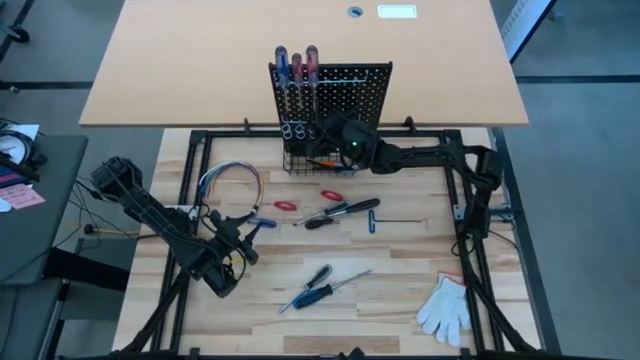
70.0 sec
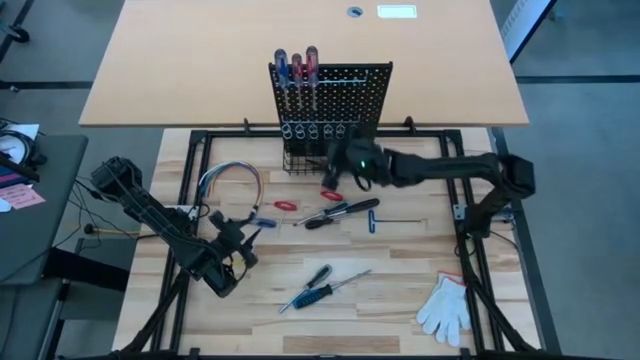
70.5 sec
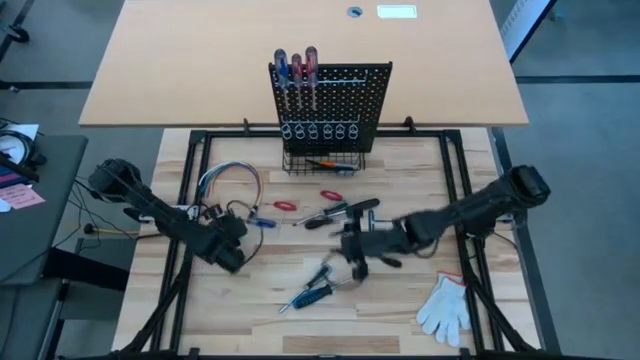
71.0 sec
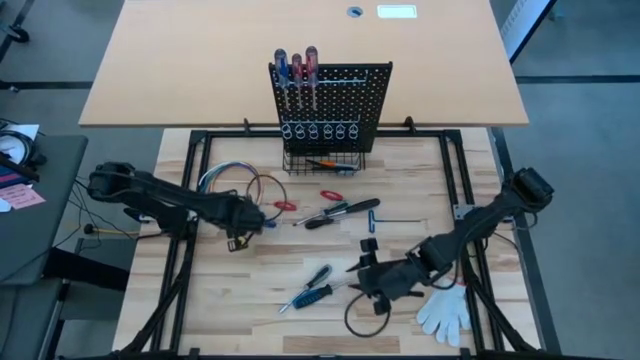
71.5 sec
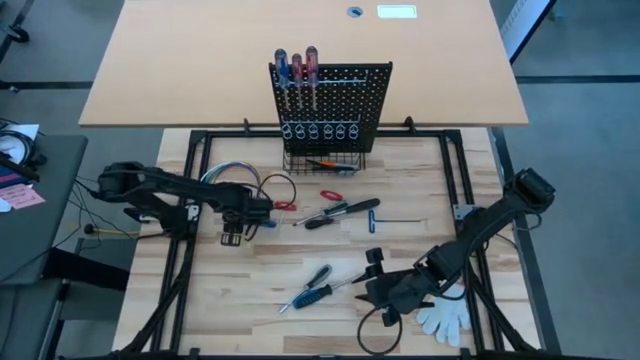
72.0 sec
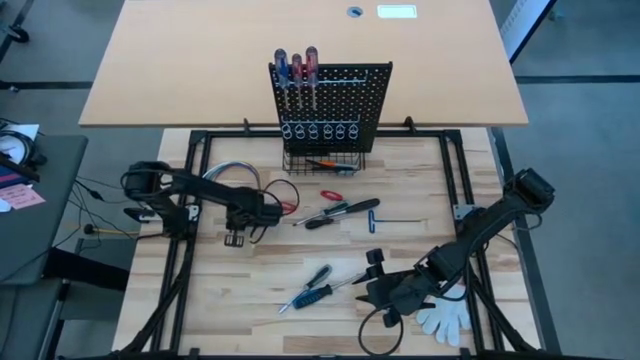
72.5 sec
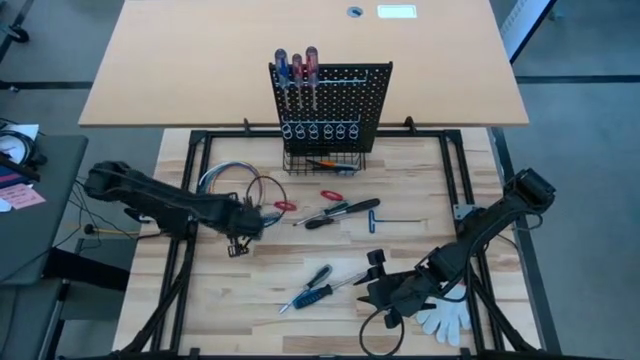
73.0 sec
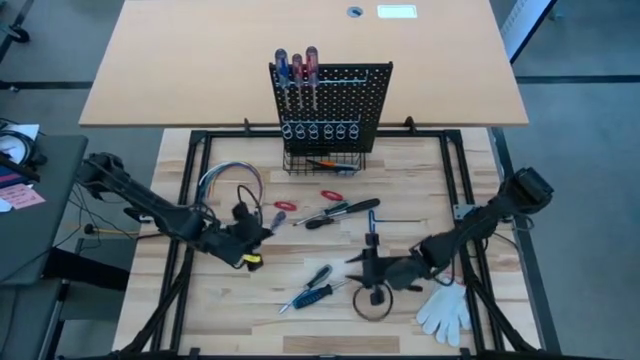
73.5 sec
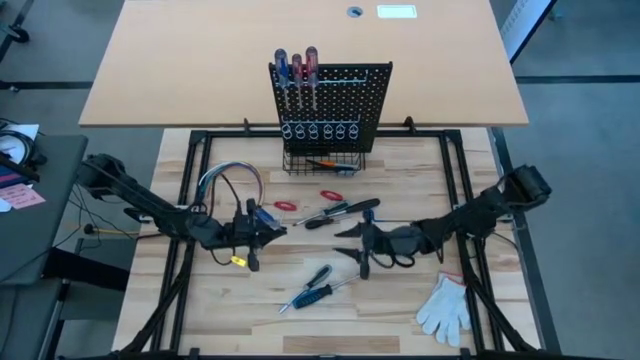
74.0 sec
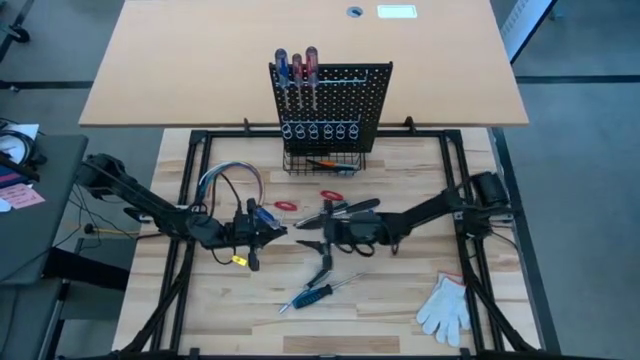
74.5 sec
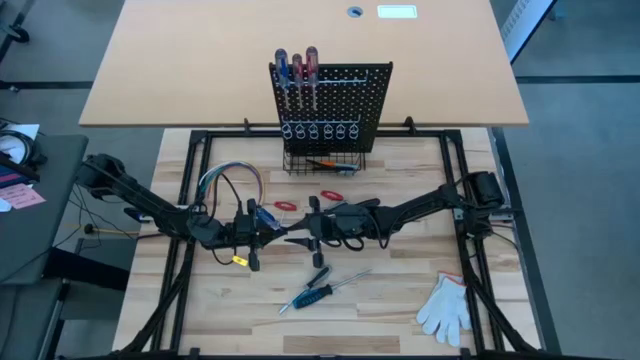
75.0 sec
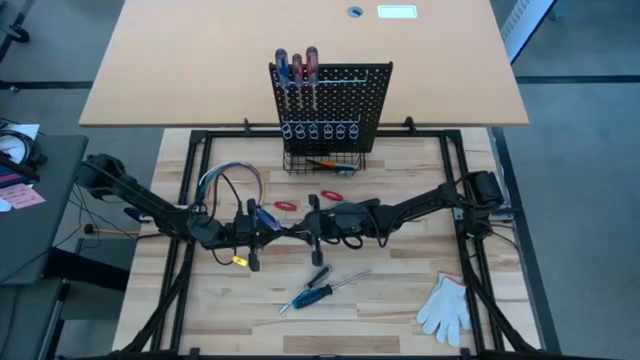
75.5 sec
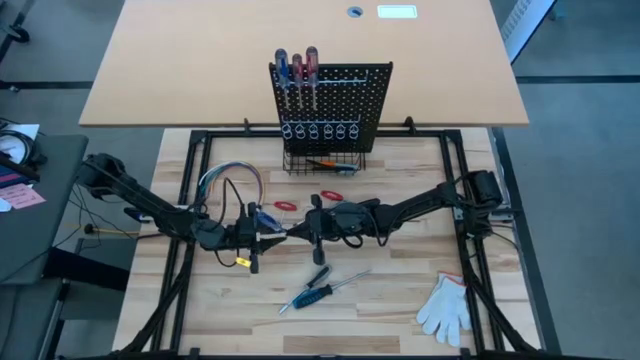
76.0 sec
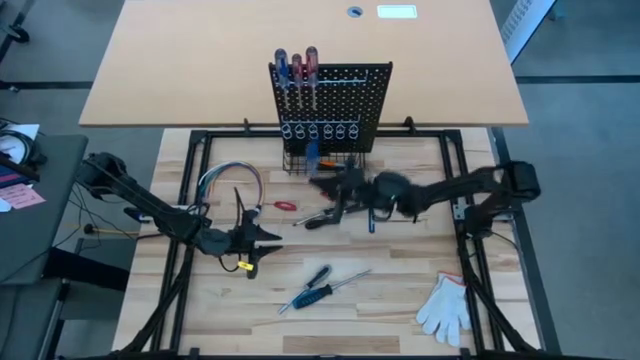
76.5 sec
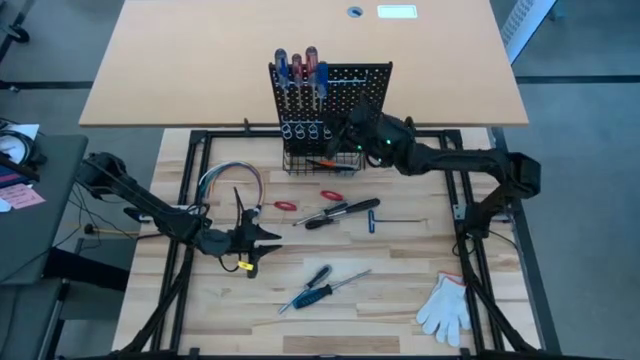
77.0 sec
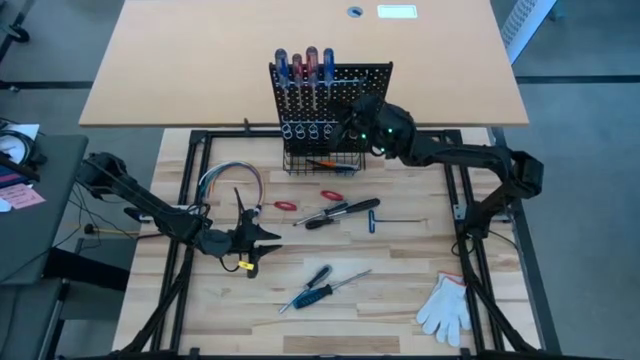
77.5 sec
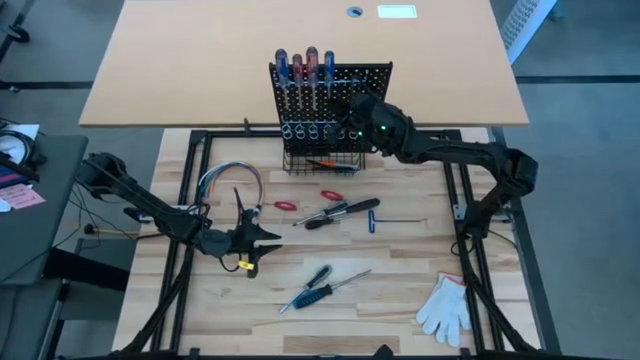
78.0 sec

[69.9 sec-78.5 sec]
Task: Hang tools onto peg board
Hang the blue screwdriver on the pegboard

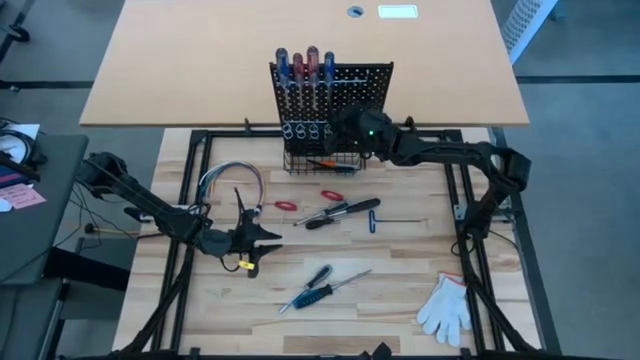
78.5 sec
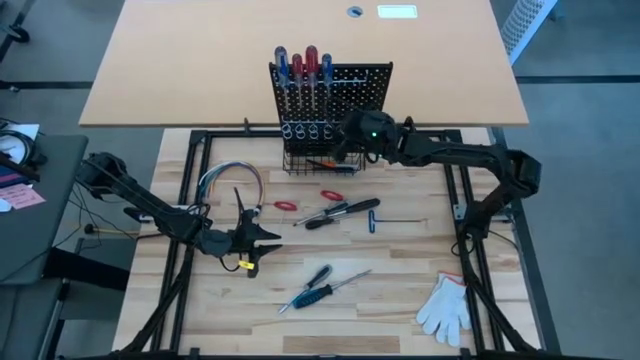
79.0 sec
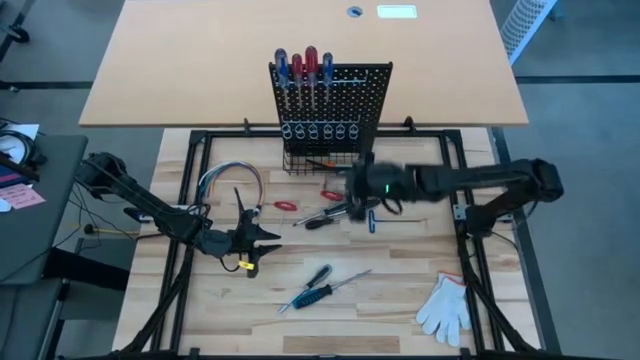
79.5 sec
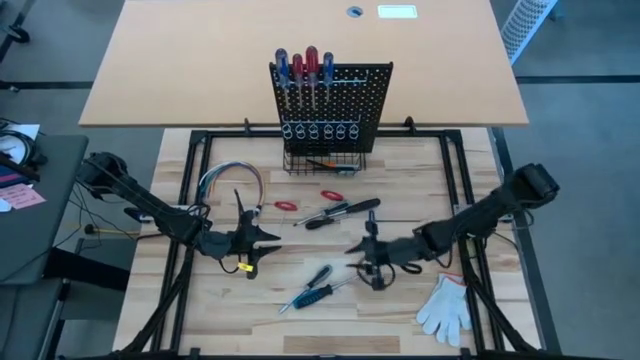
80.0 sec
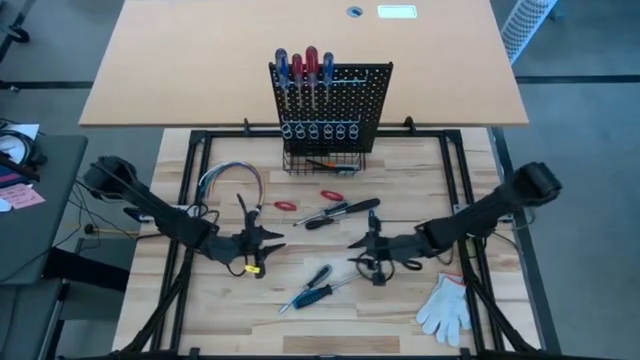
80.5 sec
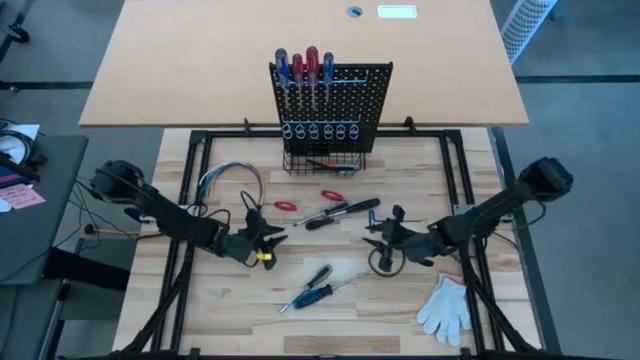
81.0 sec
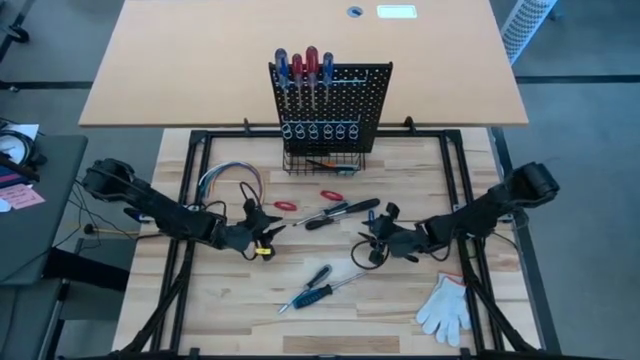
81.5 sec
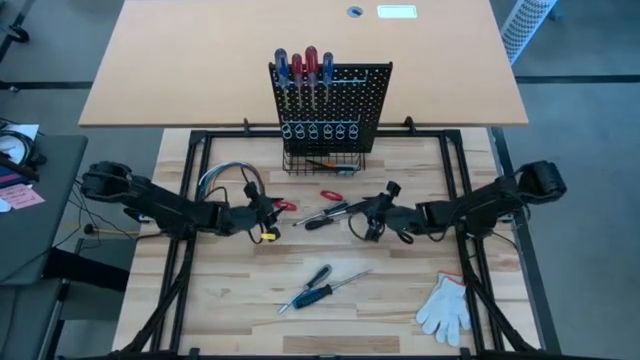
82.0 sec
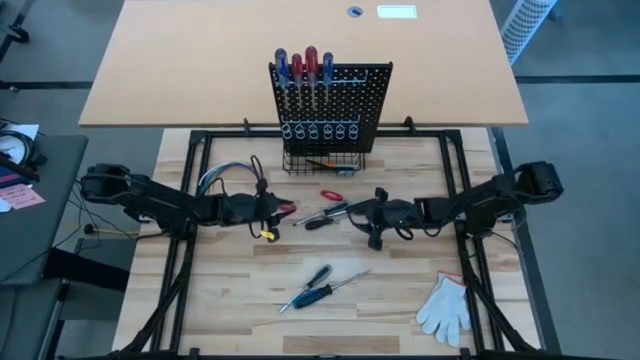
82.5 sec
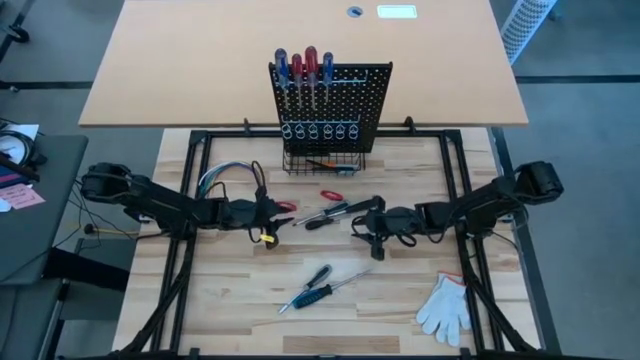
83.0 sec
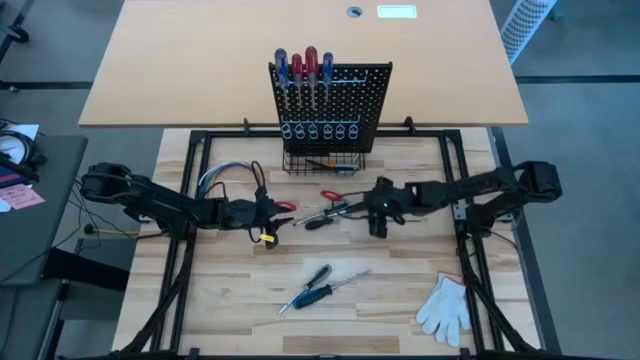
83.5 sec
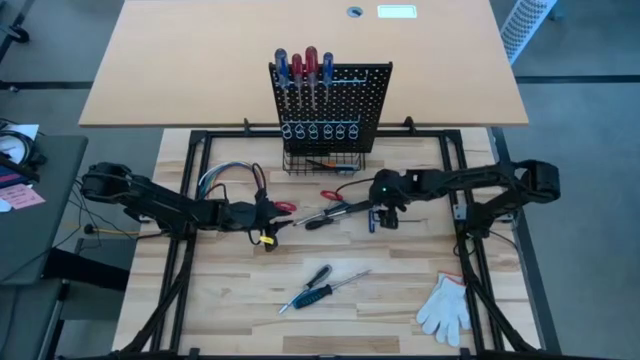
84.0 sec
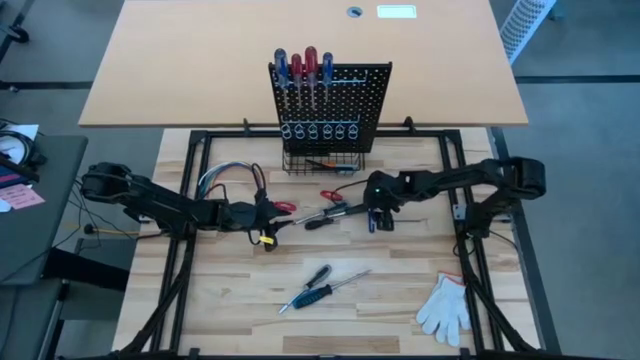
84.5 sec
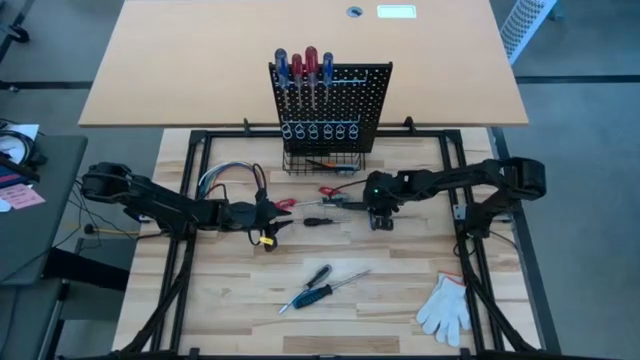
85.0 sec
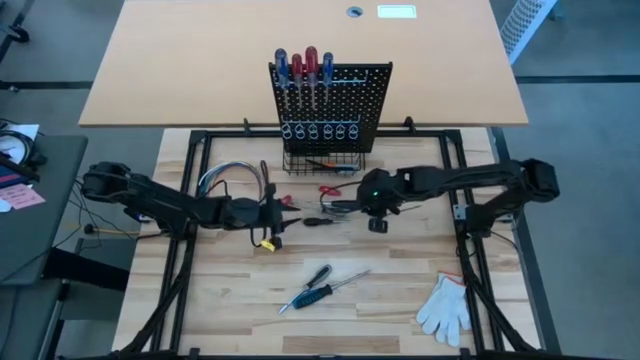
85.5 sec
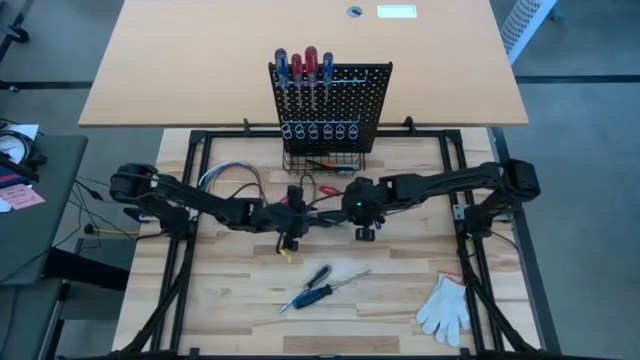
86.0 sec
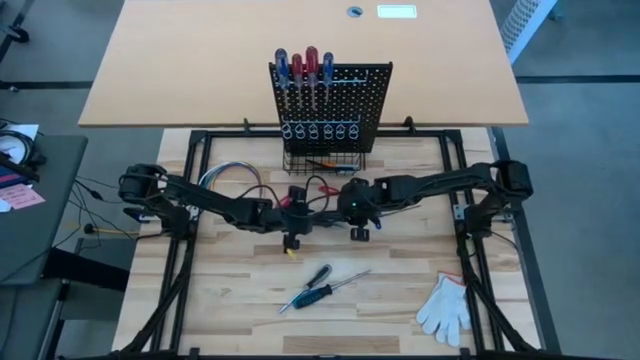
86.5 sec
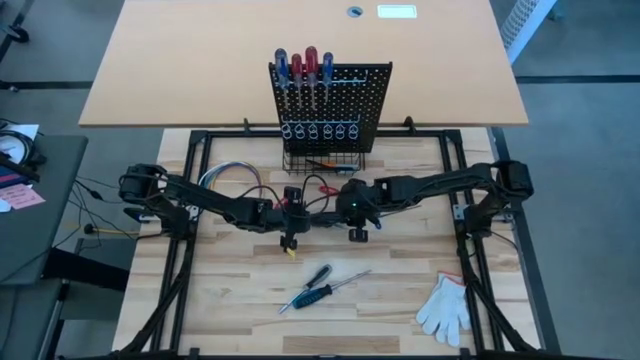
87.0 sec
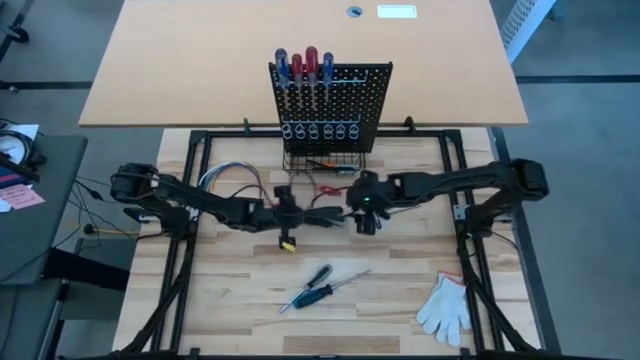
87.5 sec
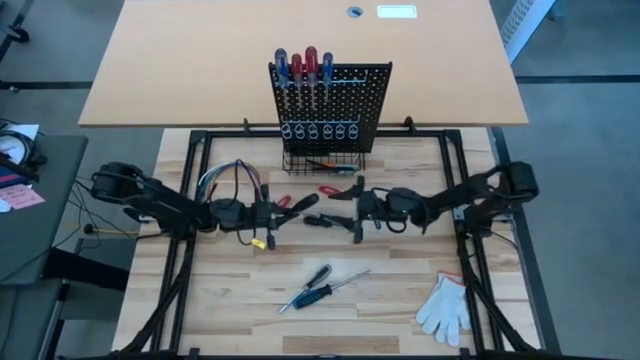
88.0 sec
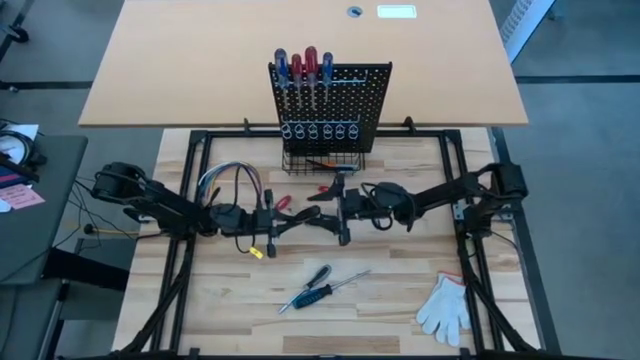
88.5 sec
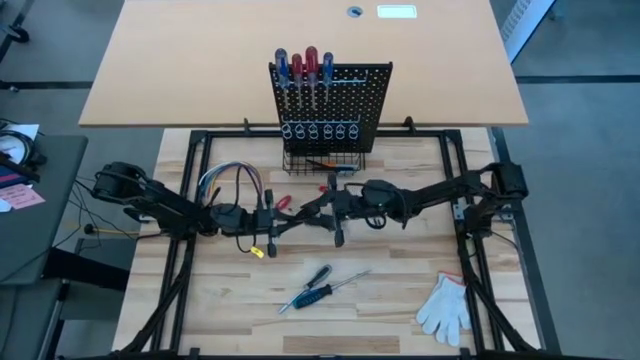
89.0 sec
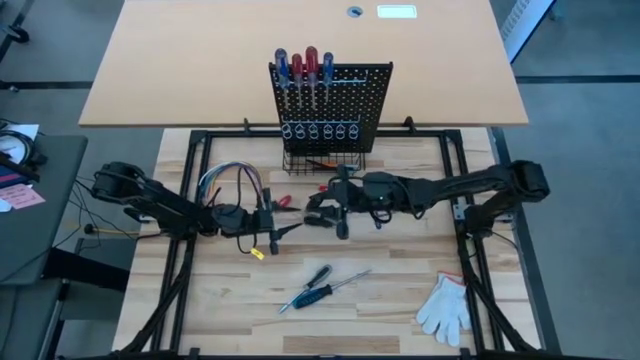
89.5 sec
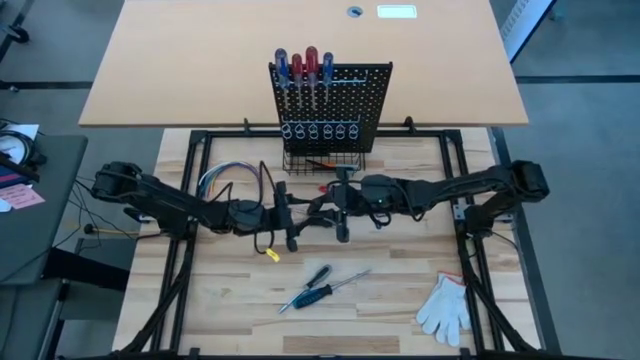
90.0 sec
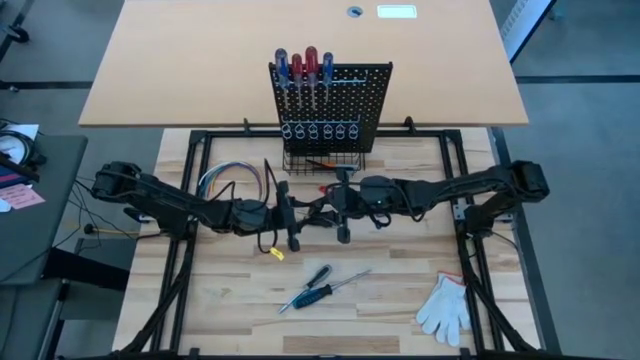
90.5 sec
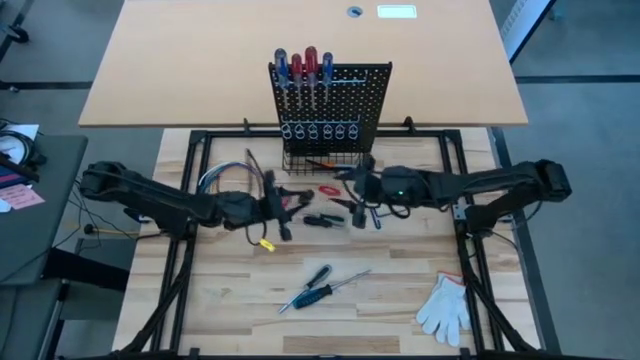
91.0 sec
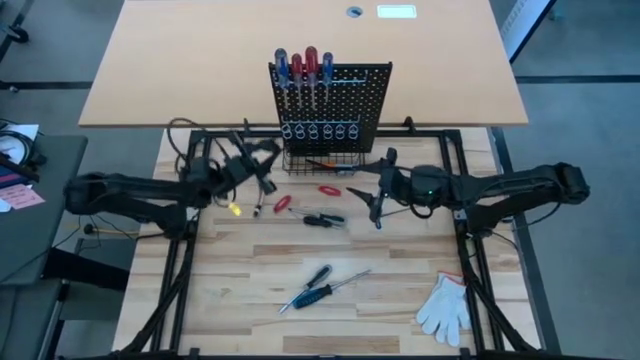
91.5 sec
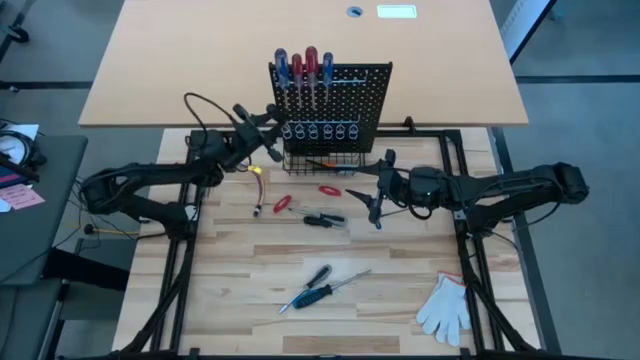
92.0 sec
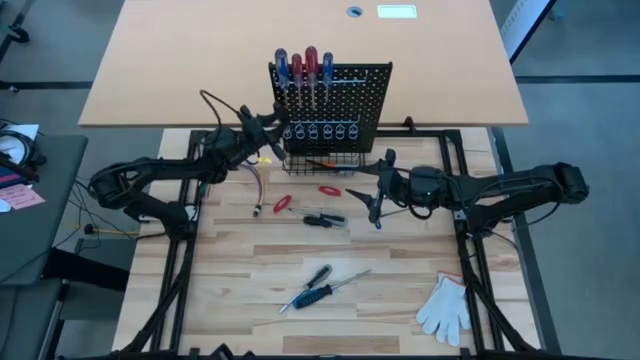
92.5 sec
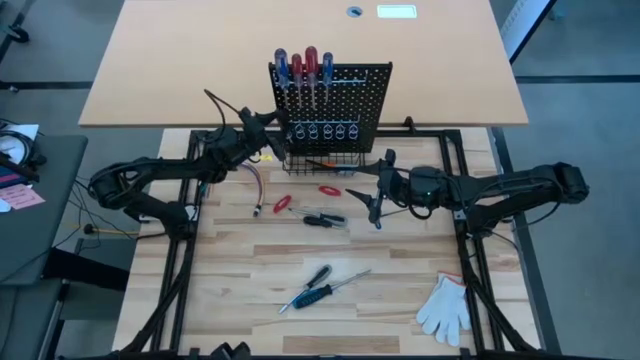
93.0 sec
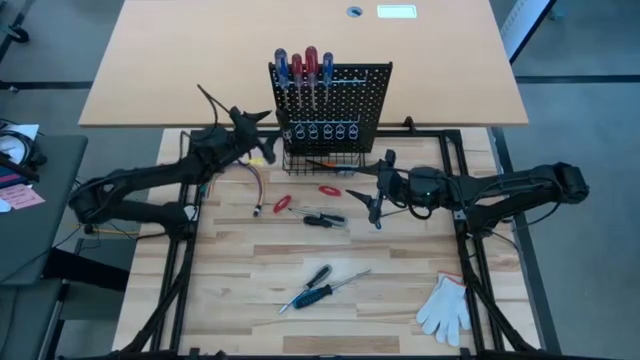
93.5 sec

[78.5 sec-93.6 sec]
Hang the top black screwdriver on the pegboard
